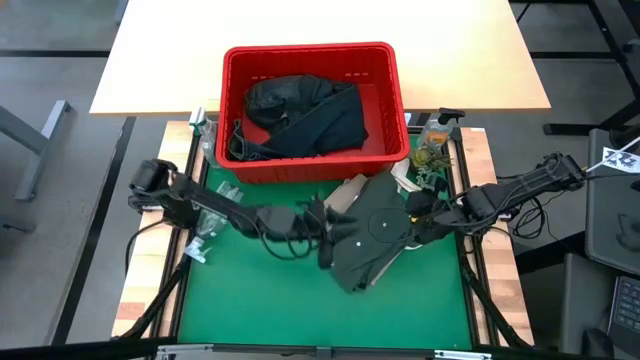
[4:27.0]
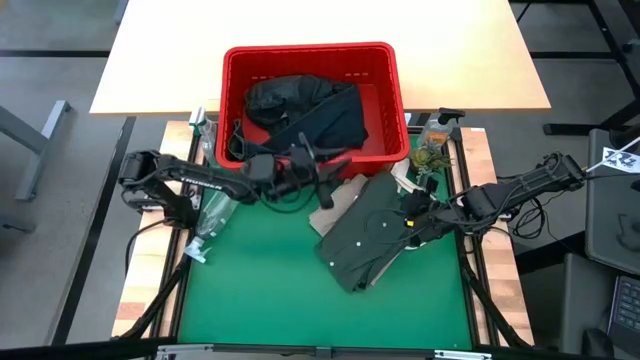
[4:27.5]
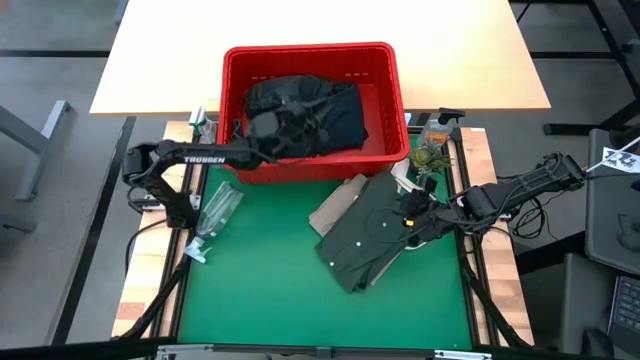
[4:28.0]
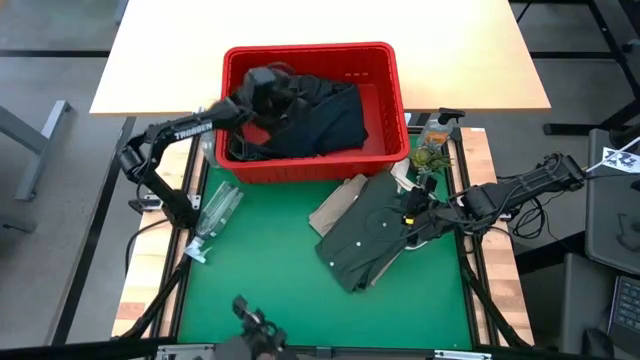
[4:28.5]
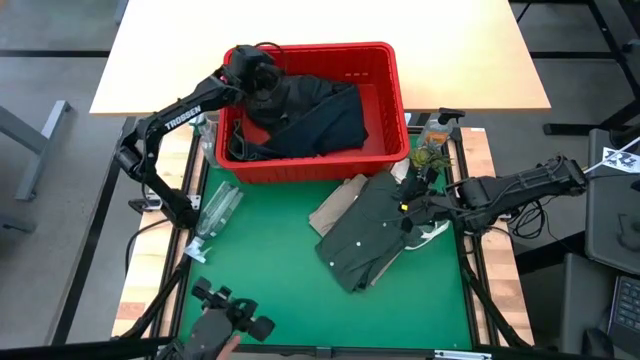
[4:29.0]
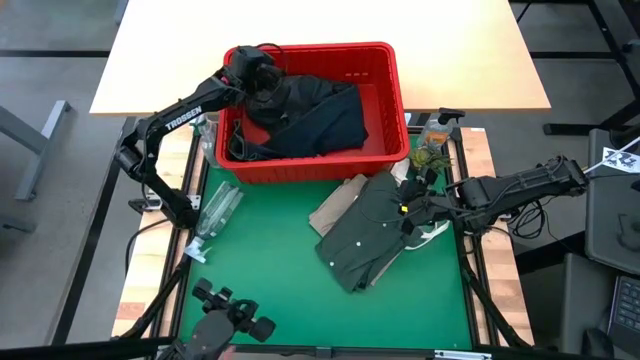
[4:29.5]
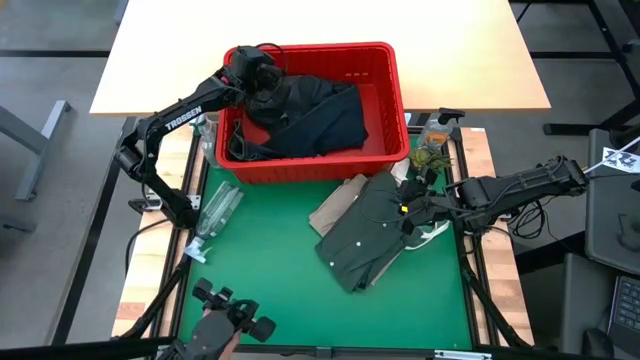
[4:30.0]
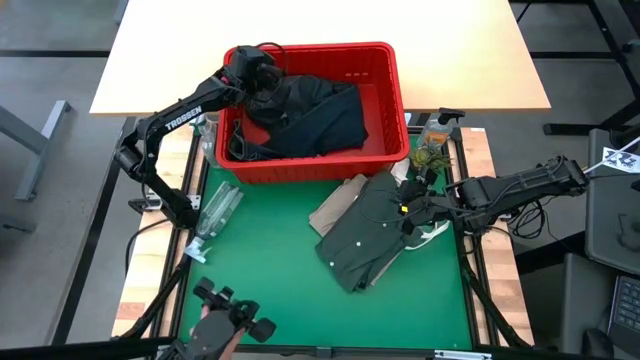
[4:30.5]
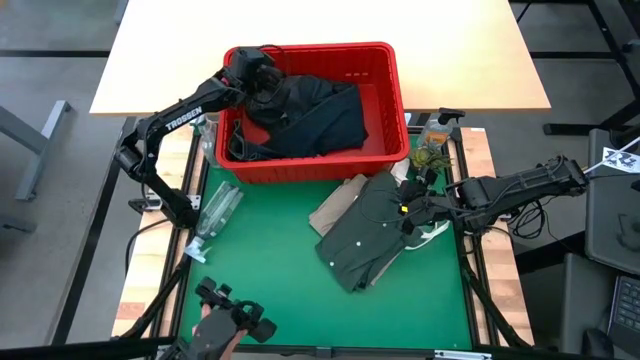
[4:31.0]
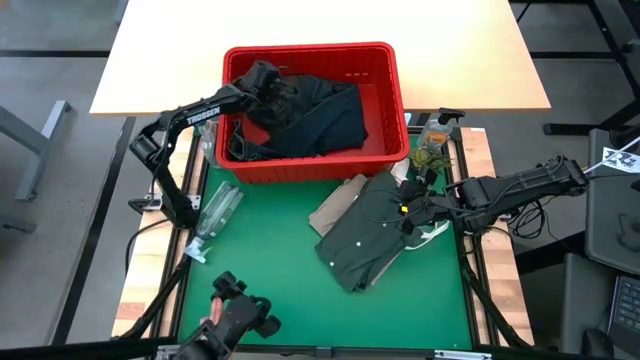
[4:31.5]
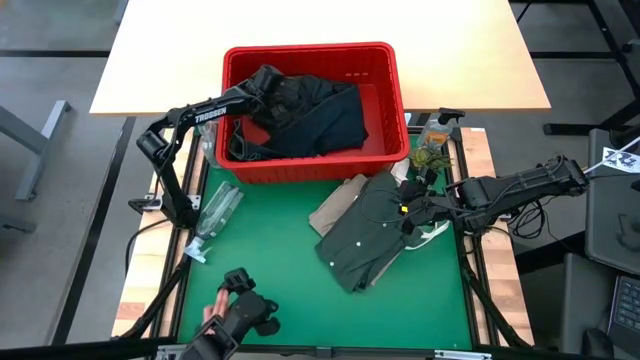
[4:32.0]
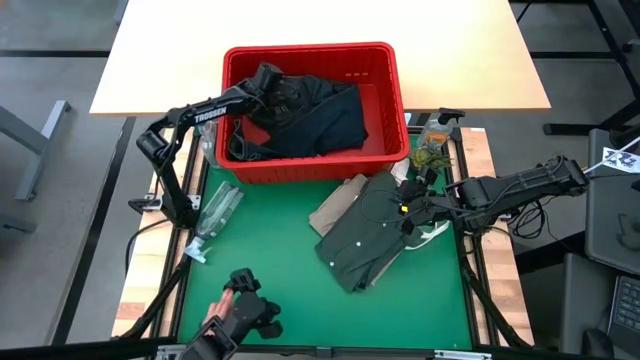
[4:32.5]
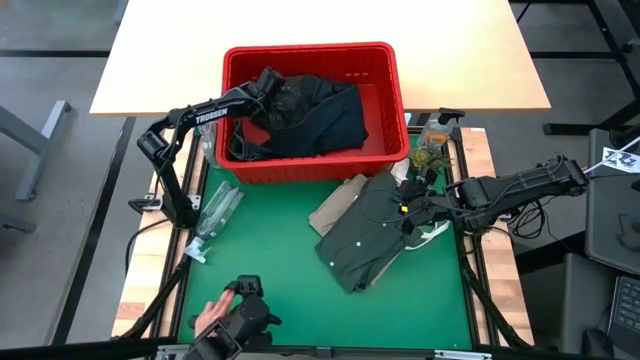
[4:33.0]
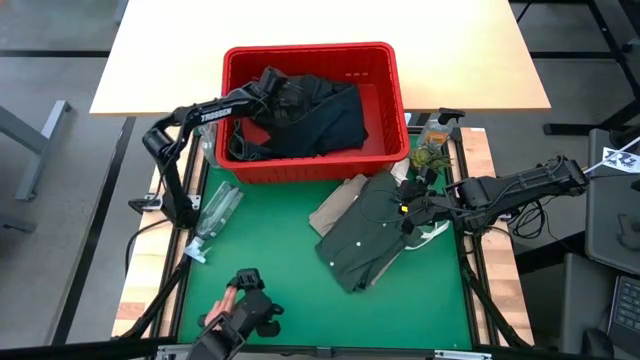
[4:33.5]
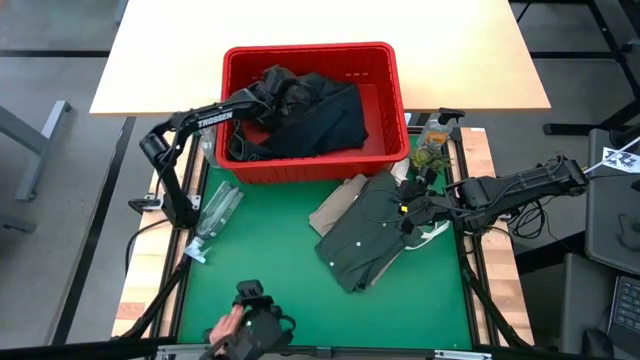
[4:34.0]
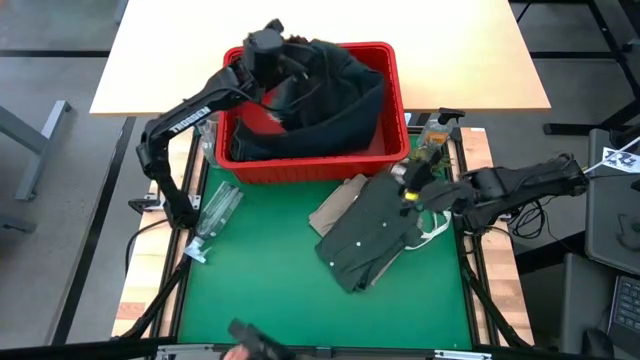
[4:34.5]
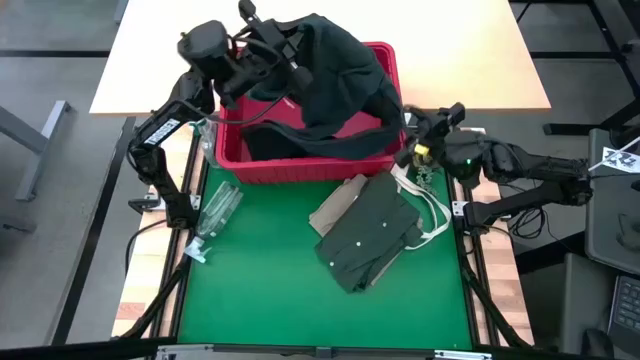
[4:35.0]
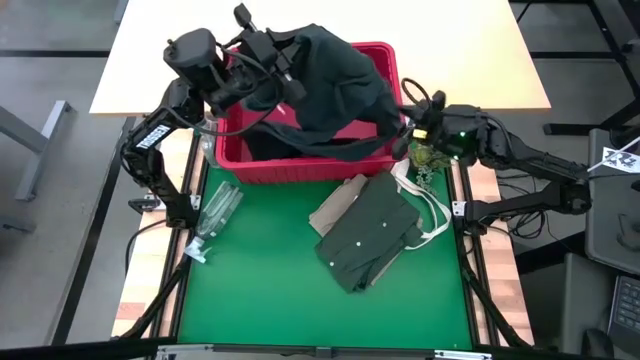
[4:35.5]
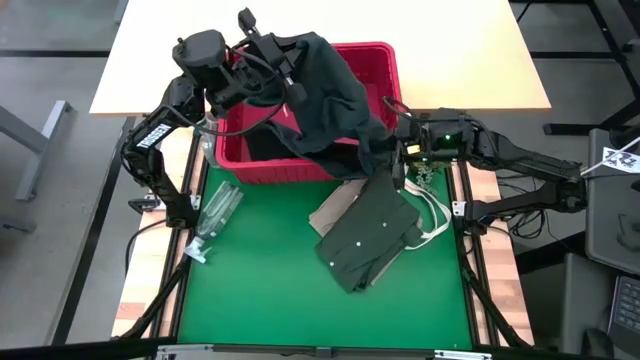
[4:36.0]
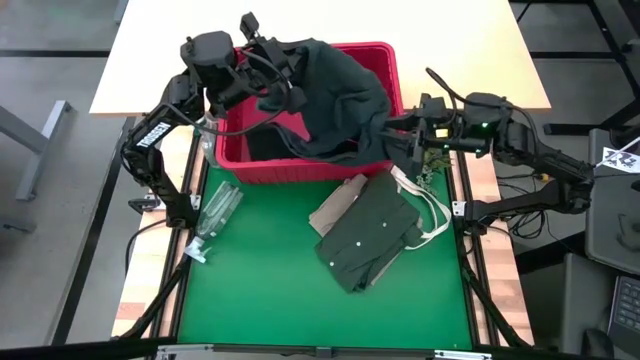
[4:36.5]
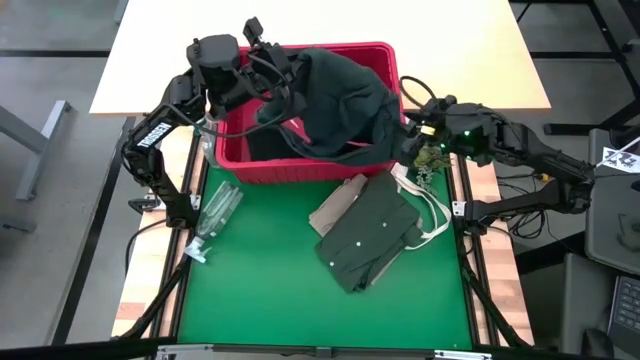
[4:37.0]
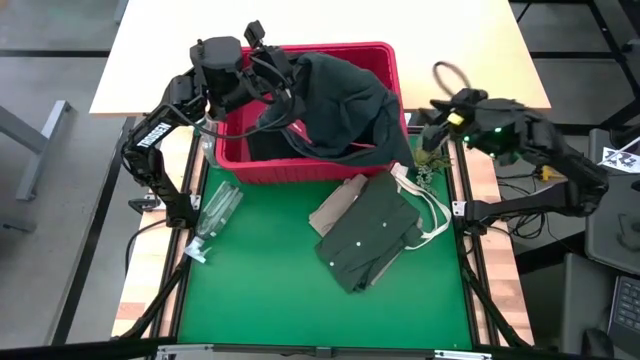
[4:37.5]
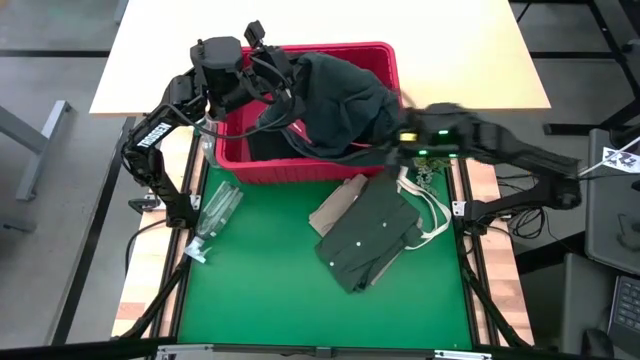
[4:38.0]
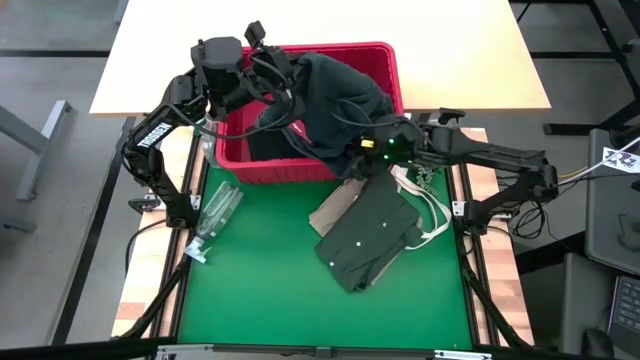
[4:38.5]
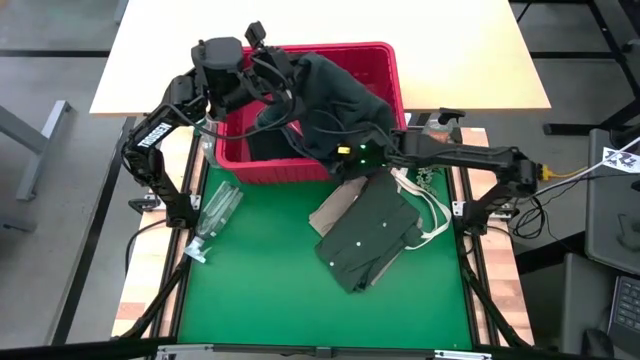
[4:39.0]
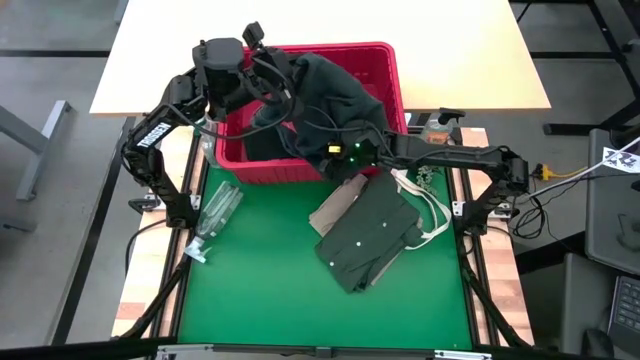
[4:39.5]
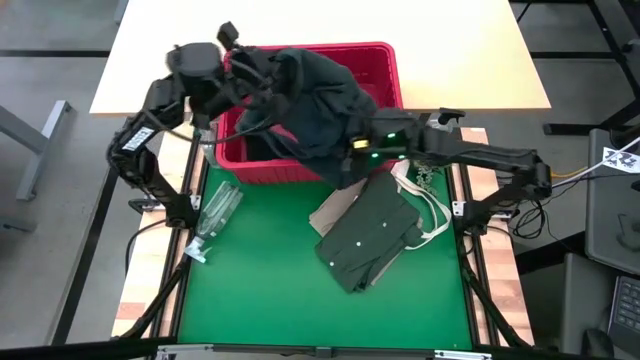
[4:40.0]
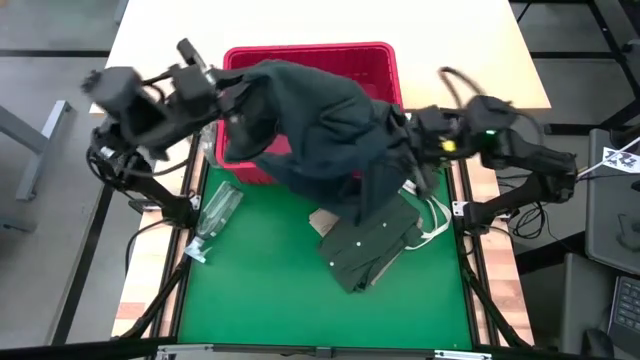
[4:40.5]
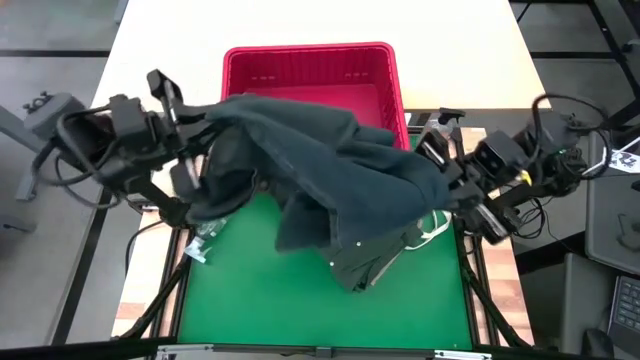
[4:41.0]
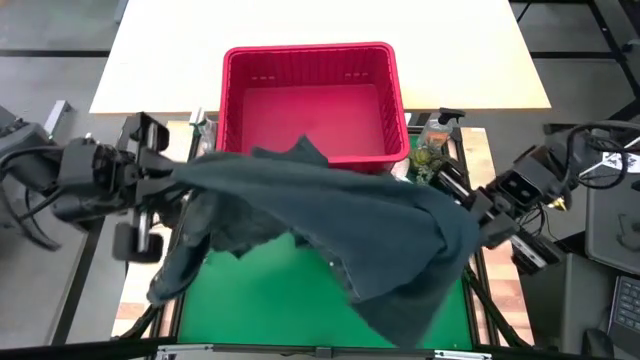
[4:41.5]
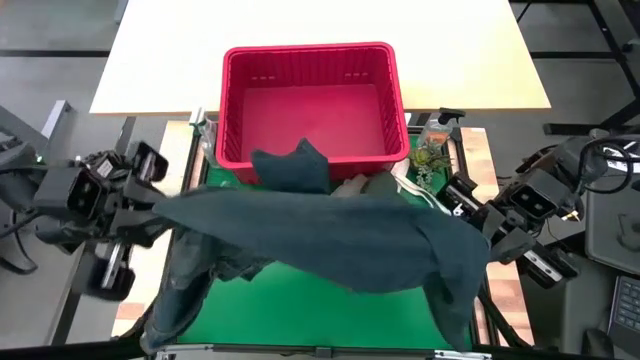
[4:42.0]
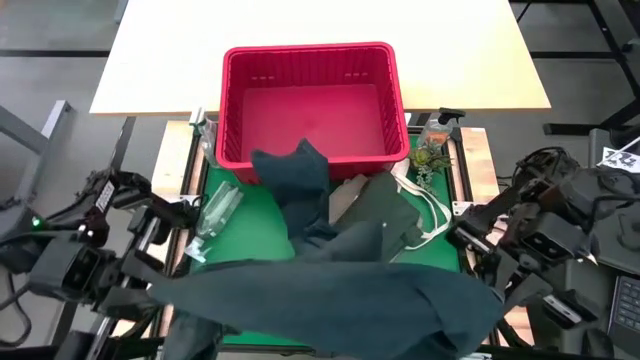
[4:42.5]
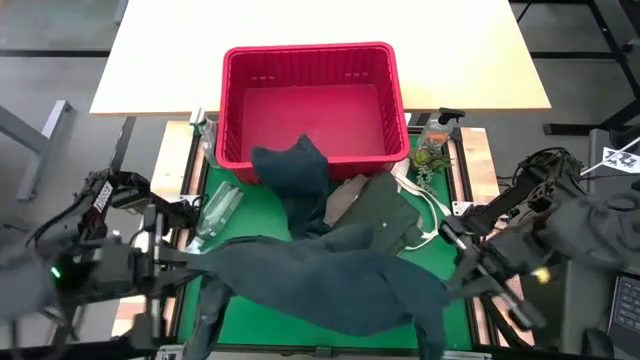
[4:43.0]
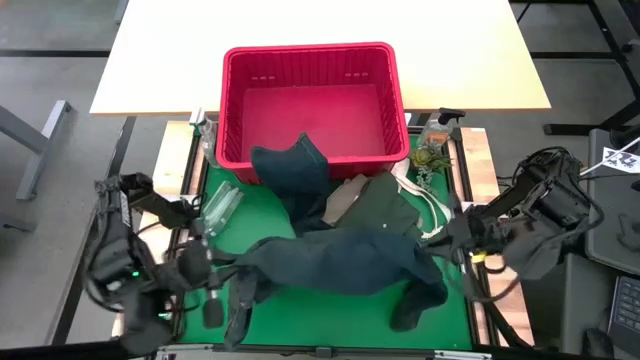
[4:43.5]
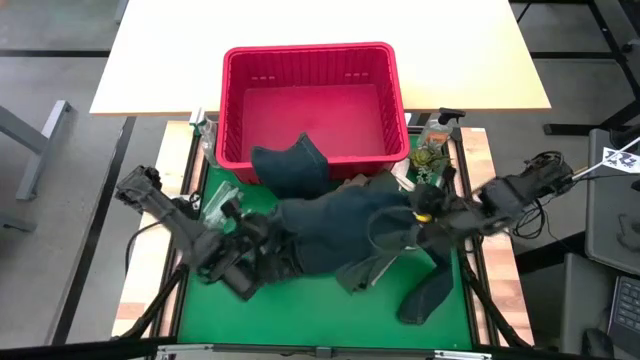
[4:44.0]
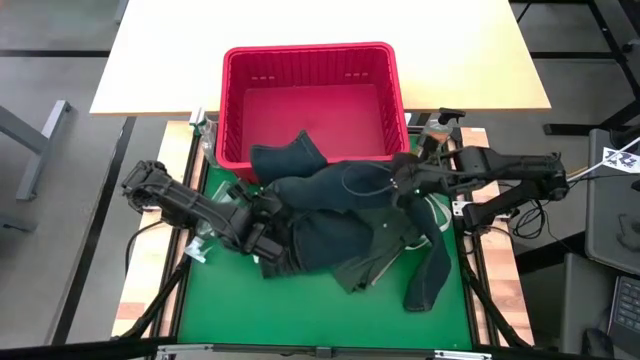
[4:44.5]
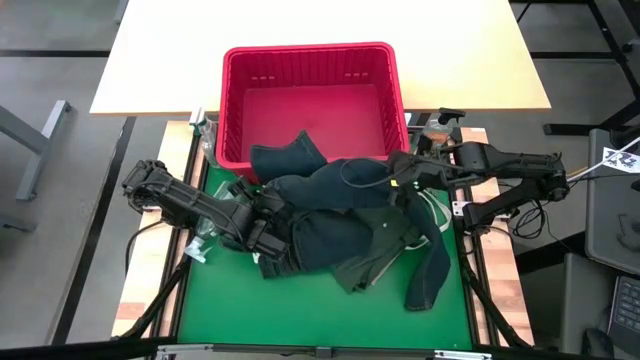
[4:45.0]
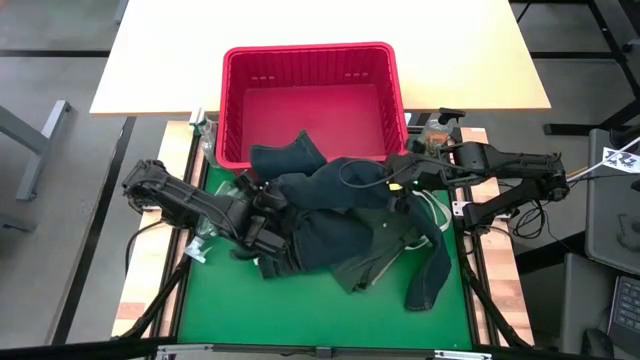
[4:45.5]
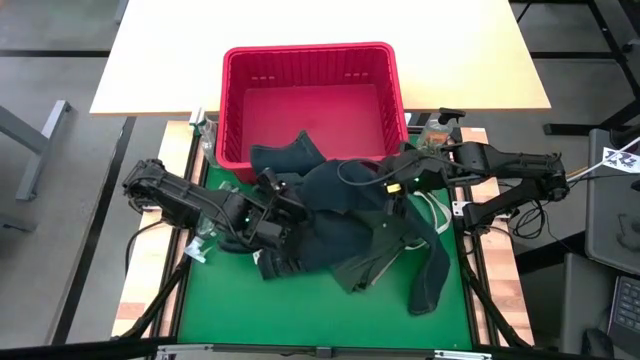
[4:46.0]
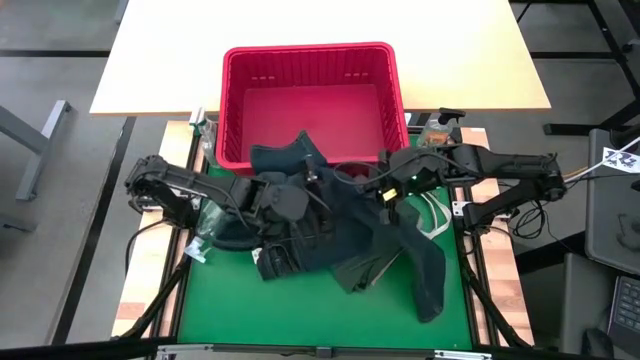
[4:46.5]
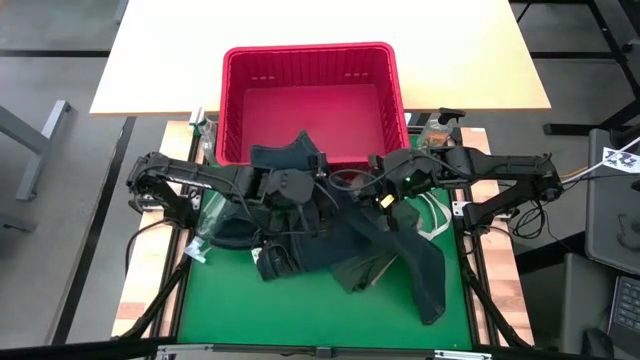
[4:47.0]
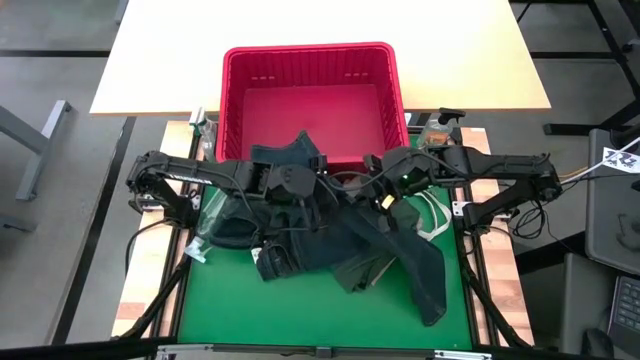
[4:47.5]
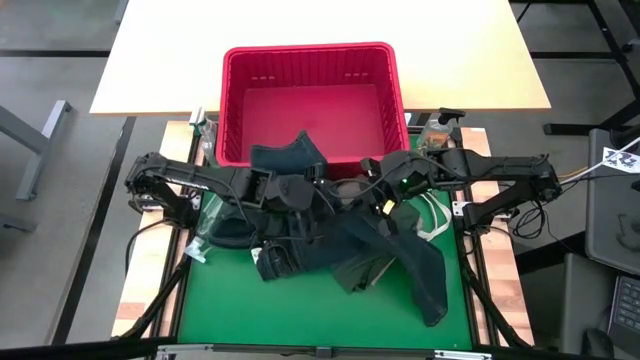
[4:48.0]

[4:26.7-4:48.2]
Task: Fold laundry
Fold the dark blue pants
